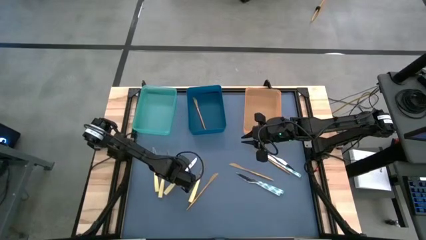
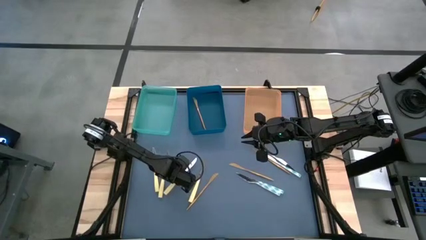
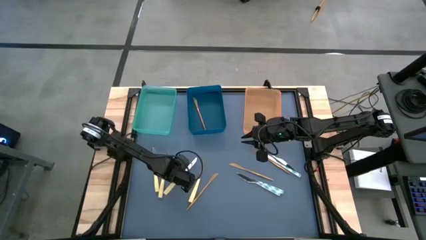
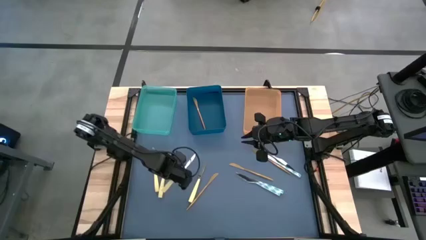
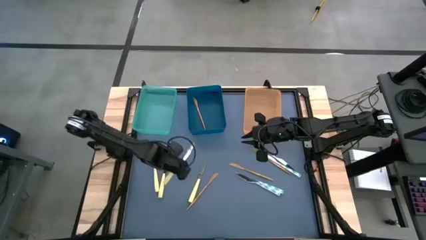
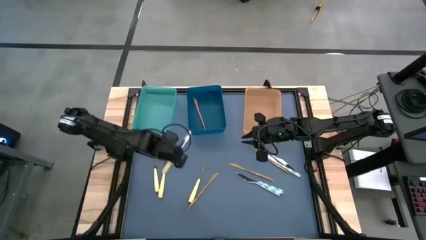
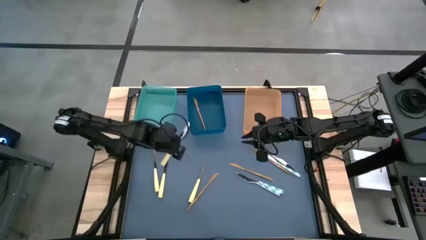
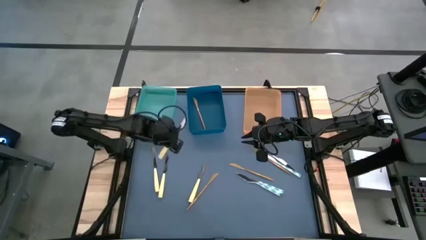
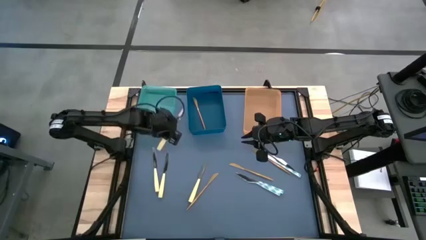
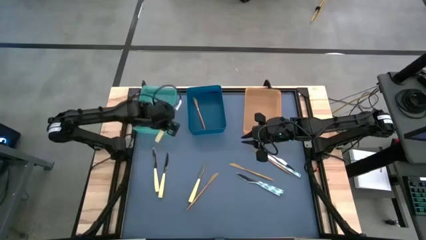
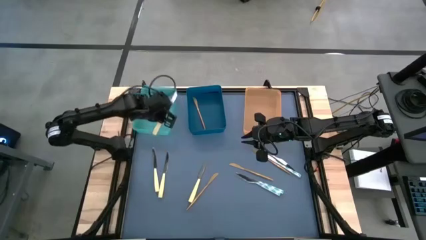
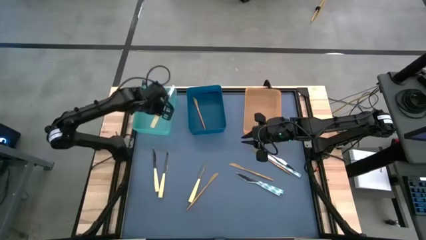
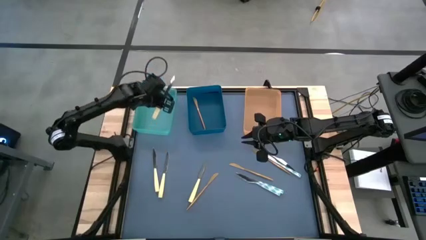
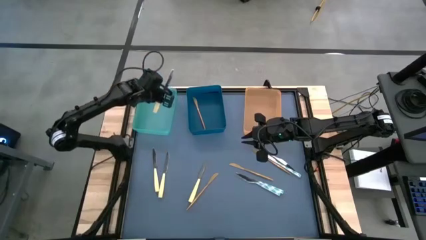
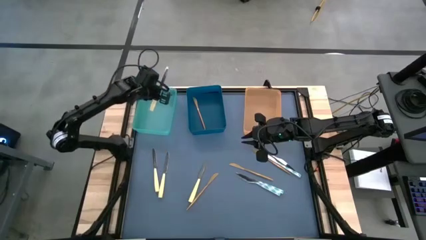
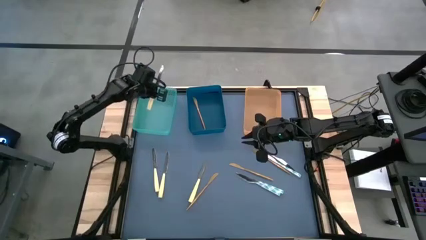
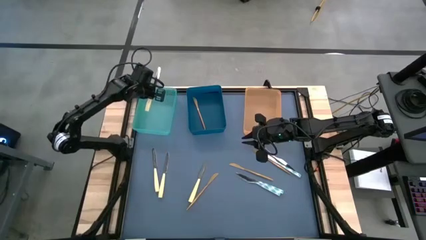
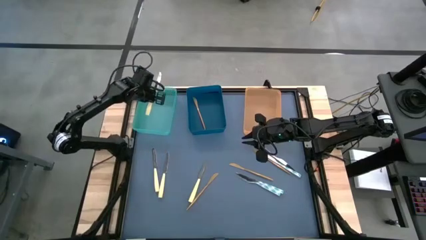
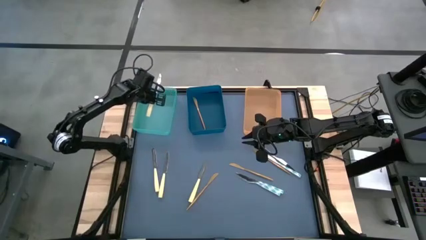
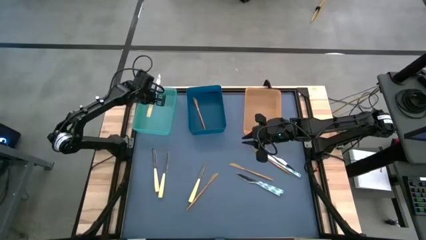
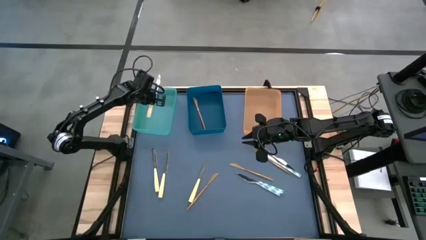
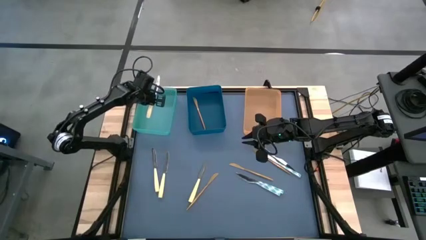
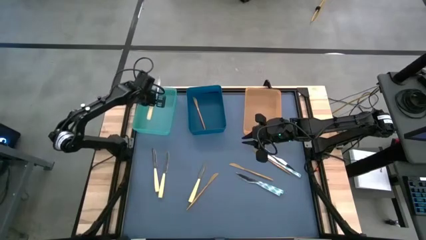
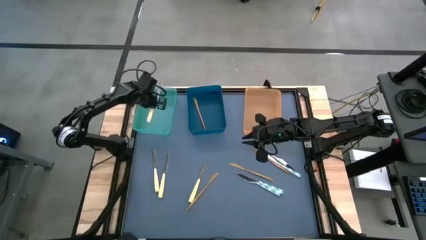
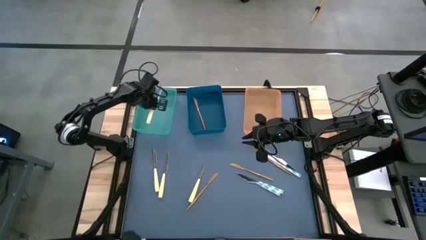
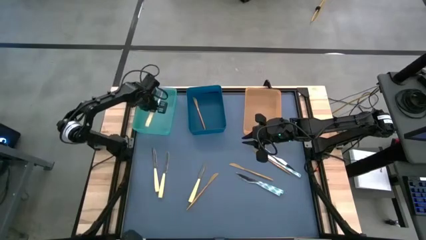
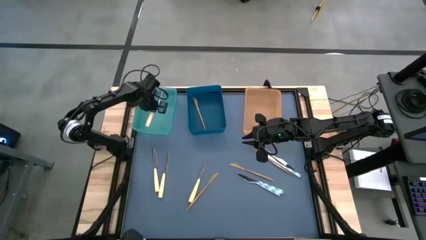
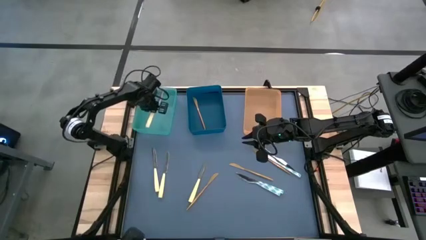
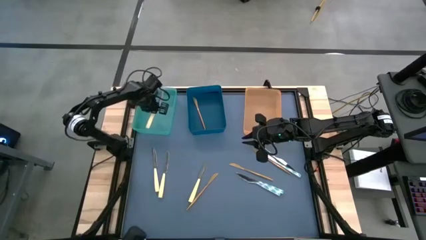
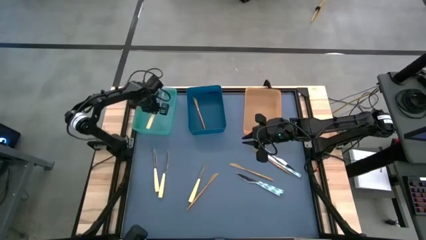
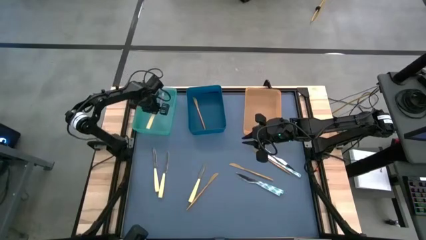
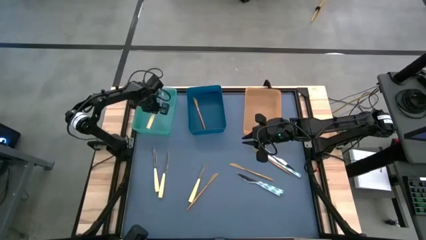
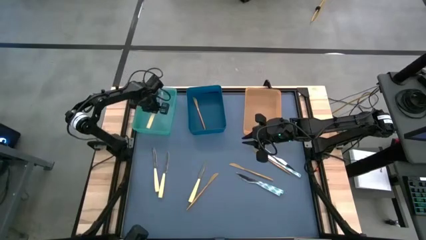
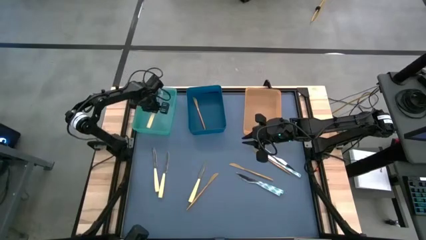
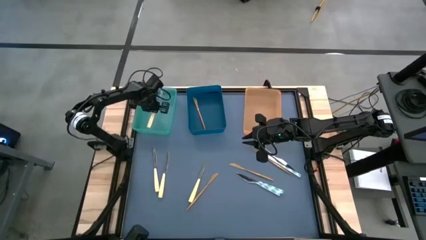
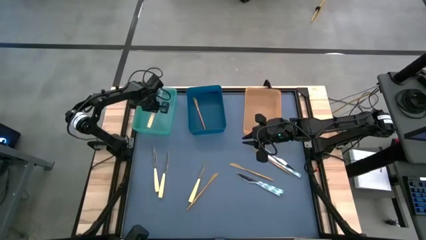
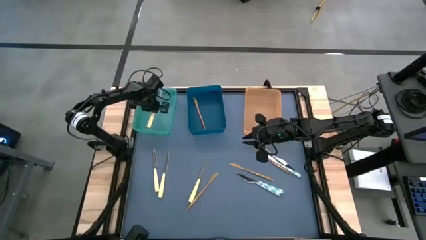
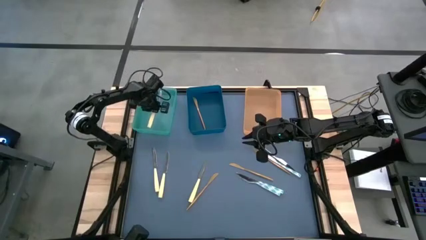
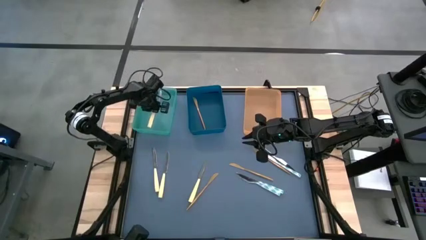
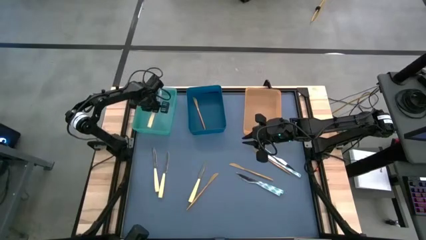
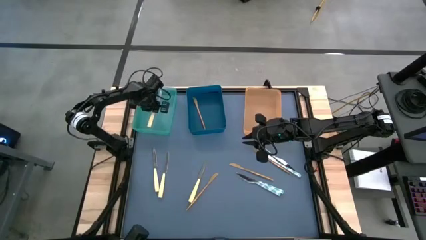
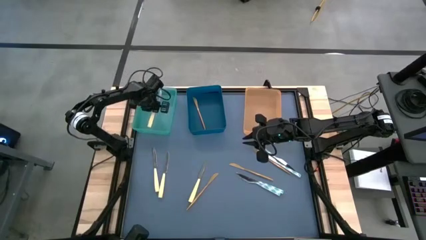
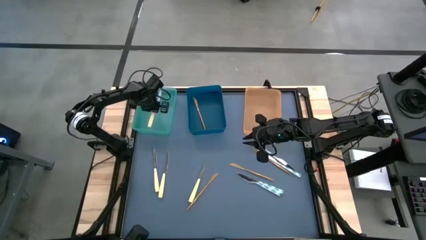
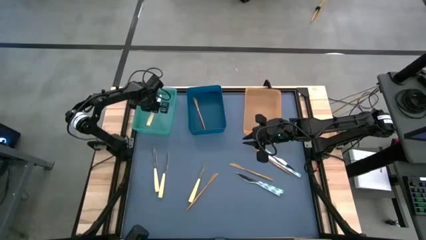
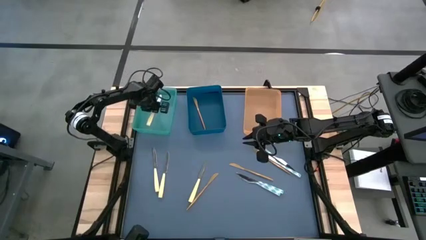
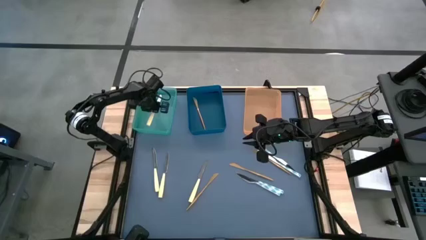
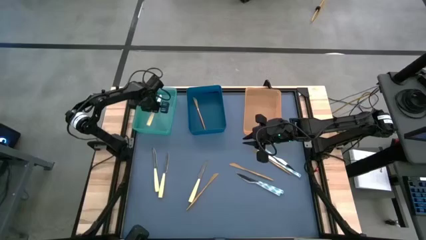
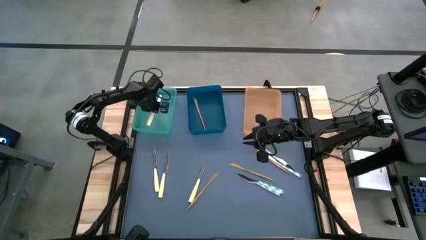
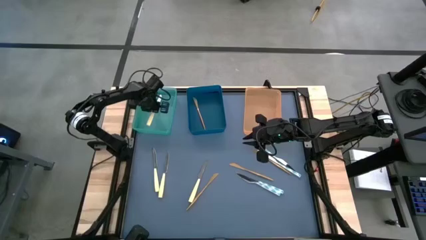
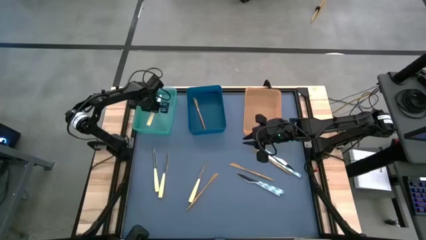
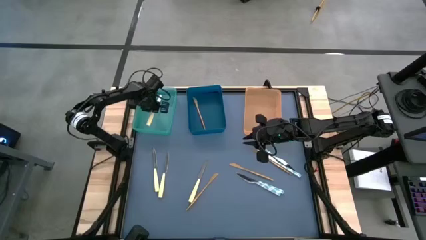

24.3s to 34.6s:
Task: Sort silverware by color (type)
Put the yellow table knife into the green bin
